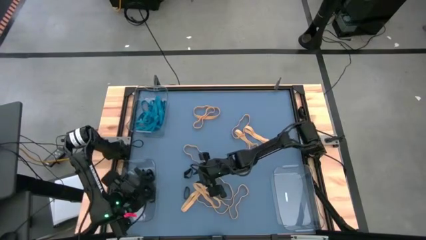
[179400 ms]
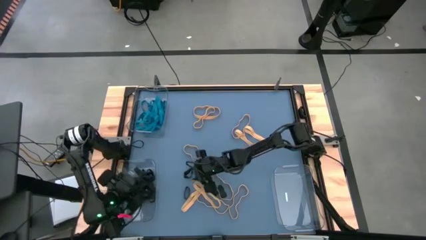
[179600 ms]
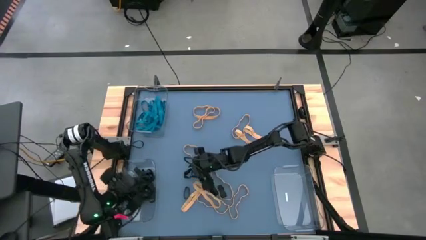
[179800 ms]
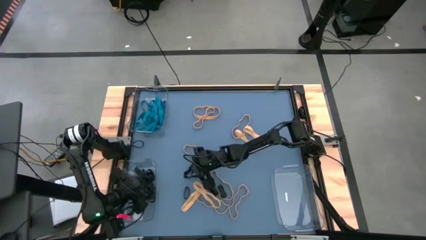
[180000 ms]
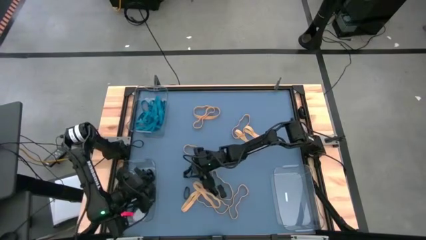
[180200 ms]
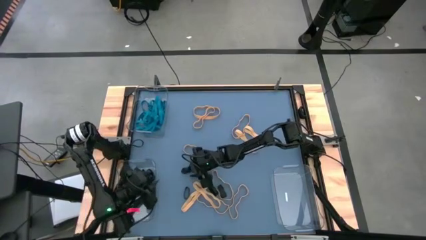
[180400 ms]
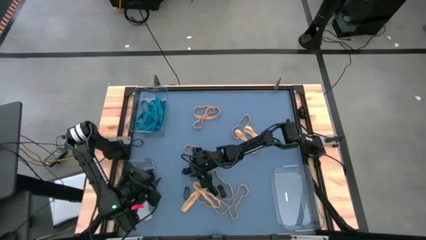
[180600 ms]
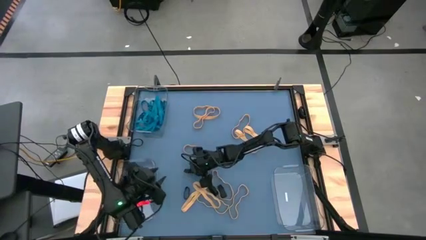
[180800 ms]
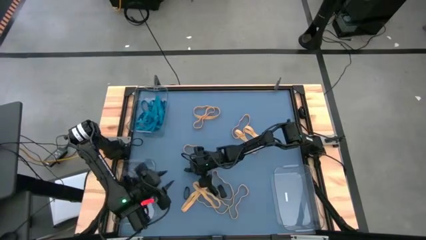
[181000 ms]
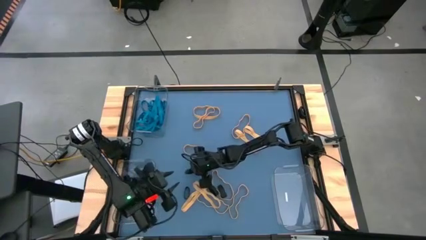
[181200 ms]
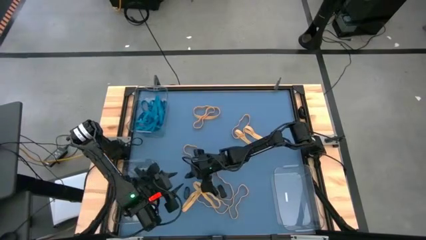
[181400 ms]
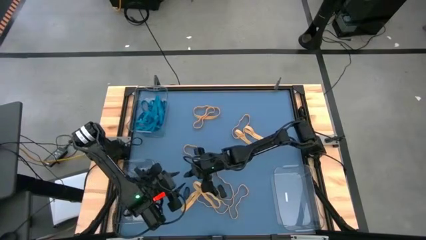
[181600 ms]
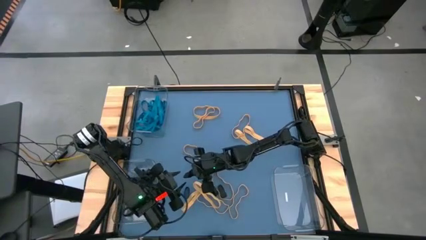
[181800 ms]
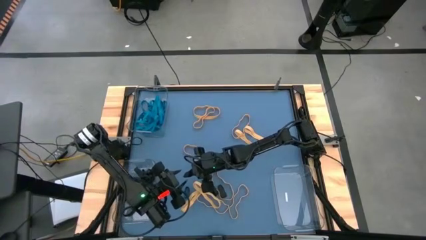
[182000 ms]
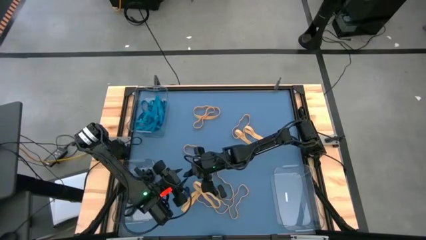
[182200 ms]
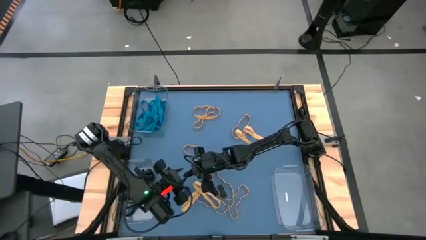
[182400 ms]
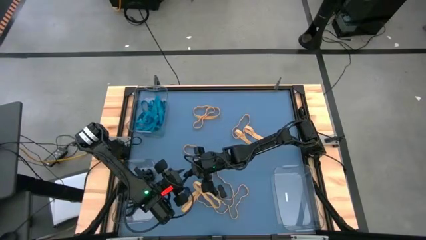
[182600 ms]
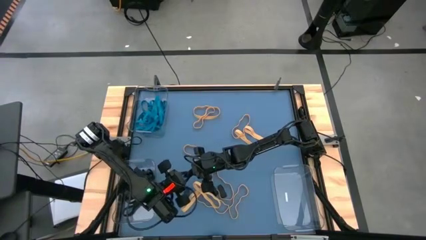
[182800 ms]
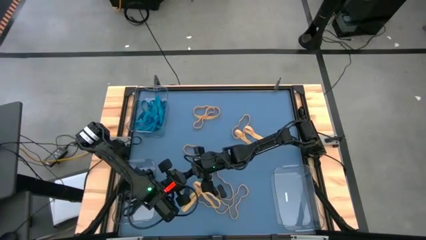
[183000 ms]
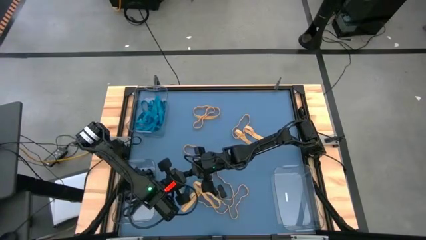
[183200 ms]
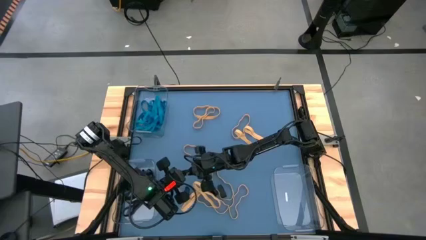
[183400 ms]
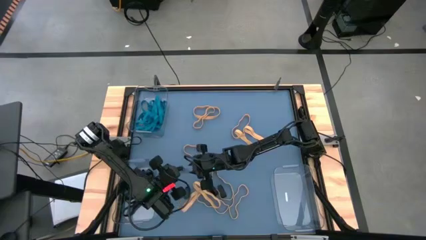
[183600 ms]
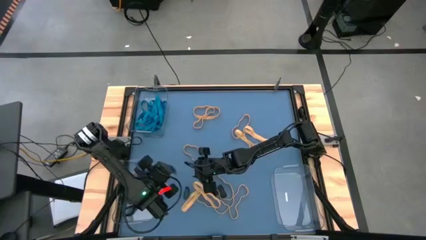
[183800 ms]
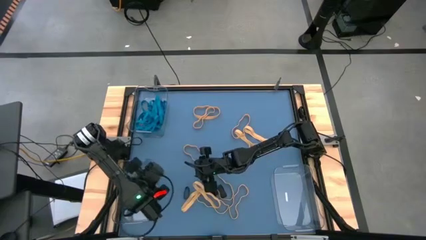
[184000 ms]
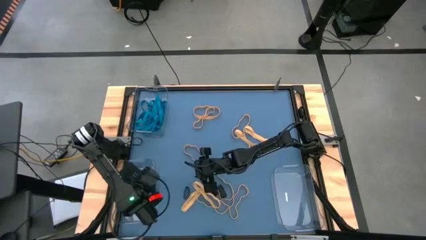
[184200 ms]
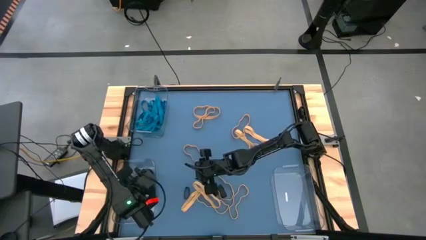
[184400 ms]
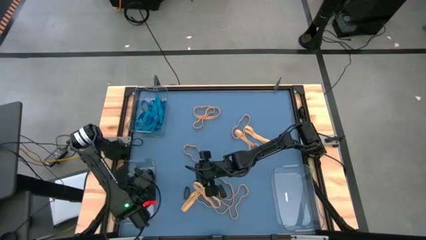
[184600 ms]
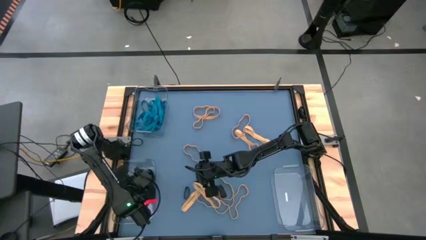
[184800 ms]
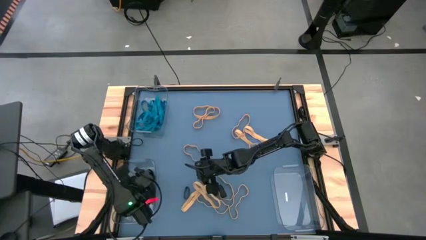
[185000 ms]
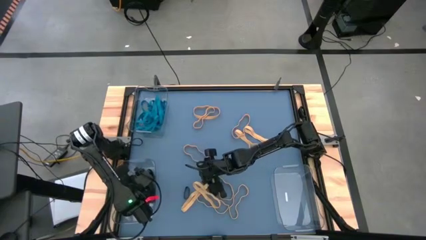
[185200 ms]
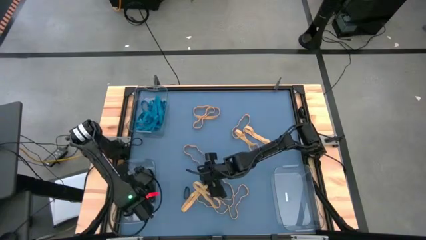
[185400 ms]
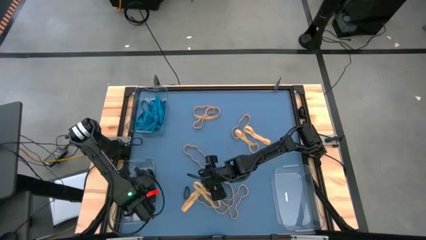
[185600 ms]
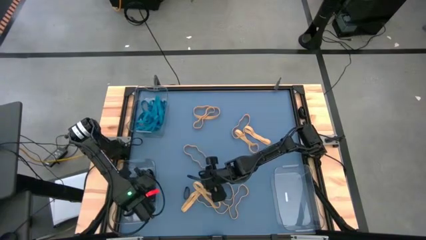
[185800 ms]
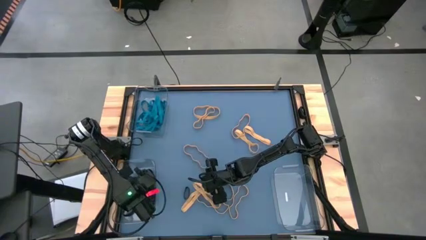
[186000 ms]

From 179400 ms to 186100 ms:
Task: Sort rubber bands into baskets
Put the black rubber band into the bottom left transparent bin

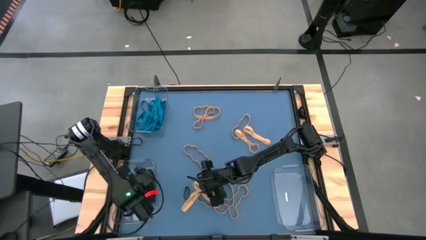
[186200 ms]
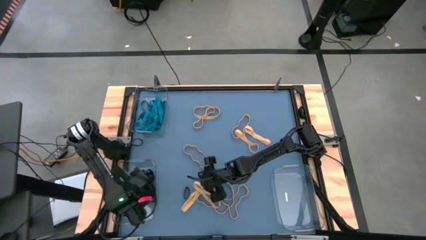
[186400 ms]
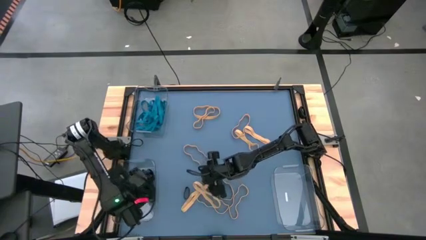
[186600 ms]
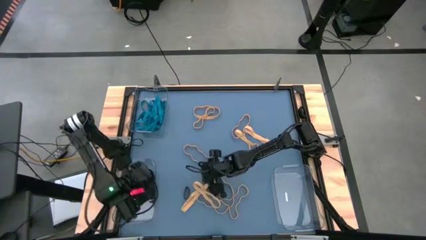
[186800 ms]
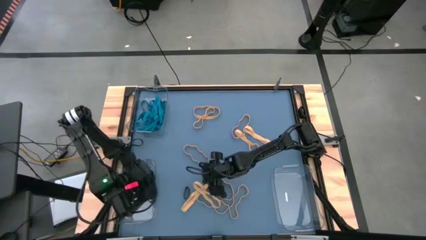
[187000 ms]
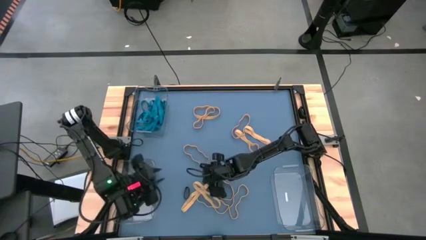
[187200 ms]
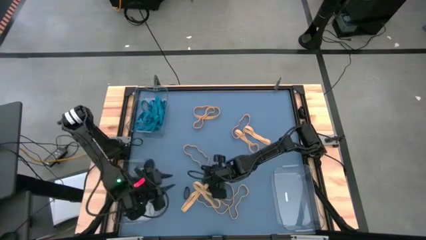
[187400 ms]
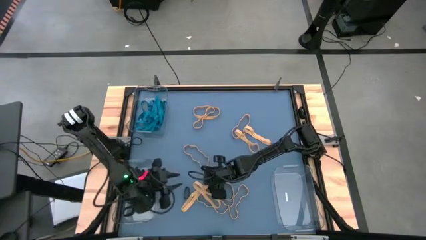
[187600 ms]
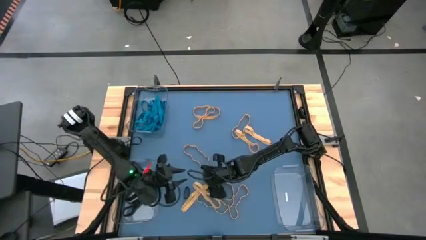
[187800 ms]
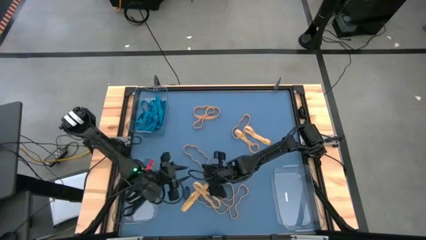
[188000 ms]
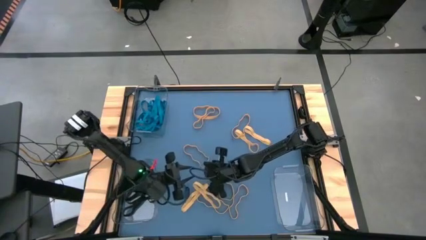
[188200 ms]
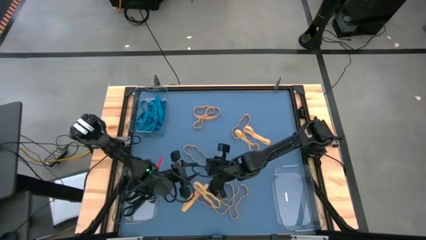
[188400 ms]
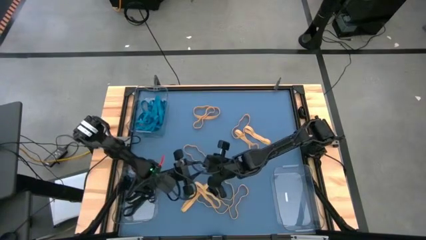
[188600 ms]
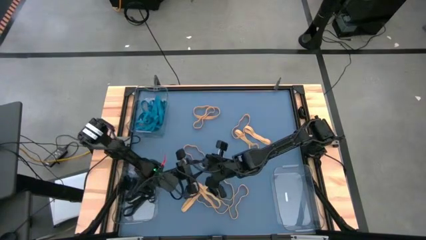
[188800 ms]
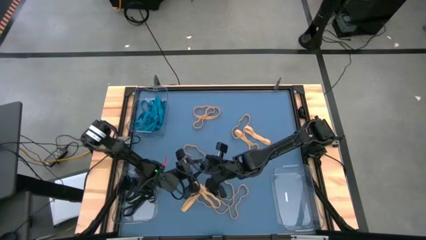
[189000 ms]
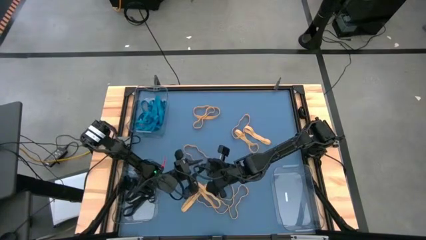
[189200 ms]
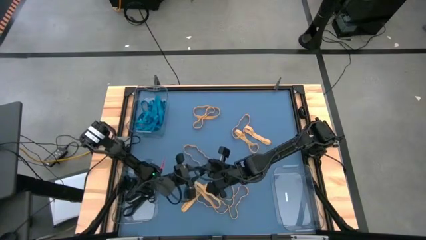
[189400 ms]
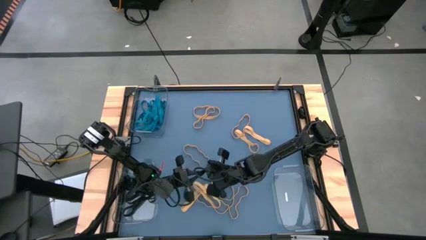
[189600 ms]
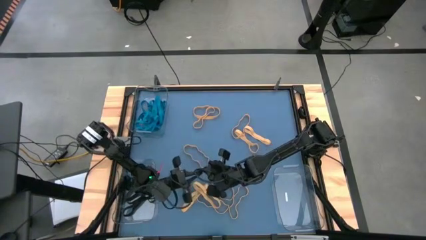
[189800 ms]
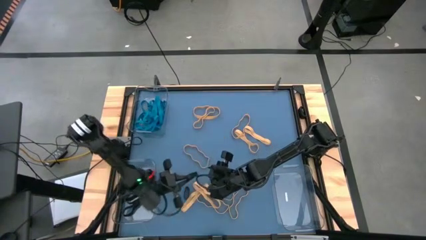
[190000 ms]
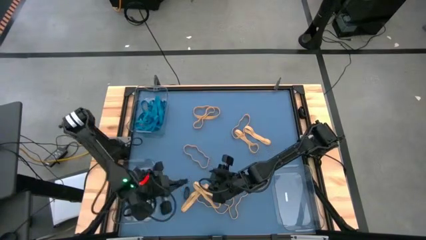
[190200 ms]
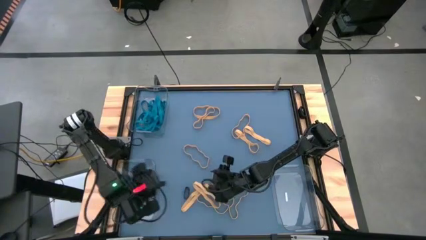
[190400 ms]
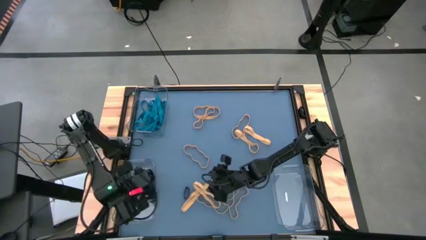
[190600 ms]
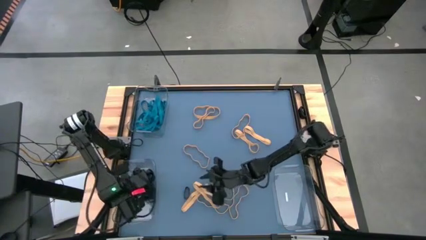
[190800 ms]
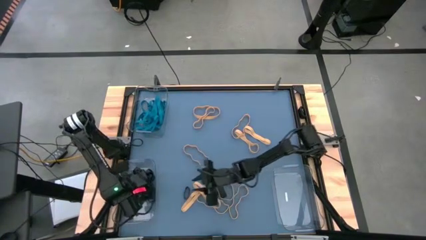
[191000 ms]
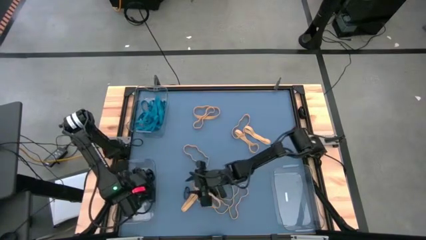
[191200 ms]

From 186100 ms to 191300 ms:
Put the black rubber band into the bottom left transparent bin

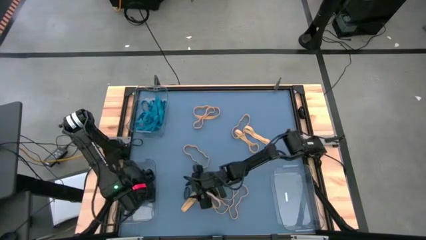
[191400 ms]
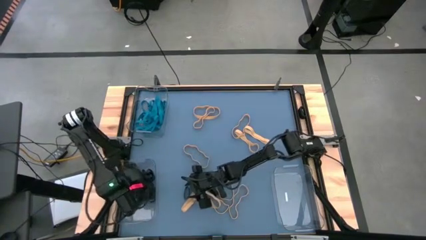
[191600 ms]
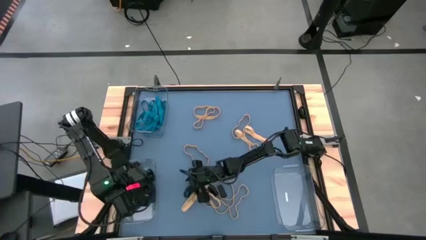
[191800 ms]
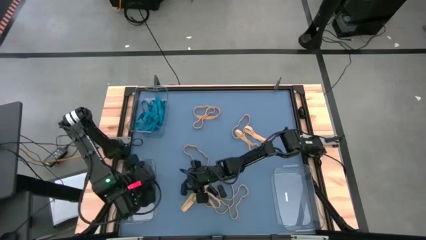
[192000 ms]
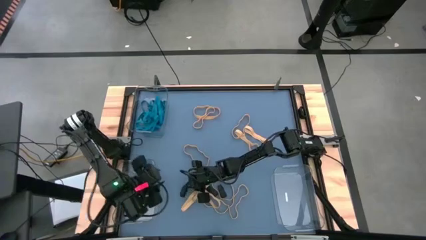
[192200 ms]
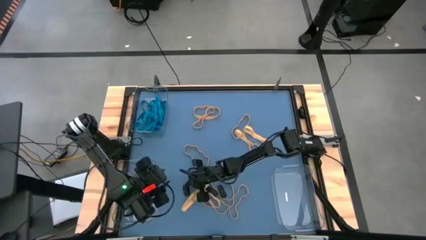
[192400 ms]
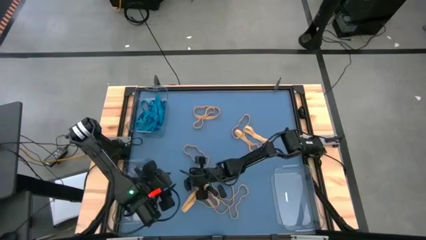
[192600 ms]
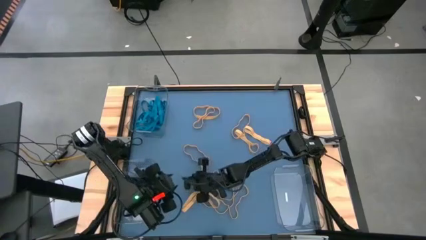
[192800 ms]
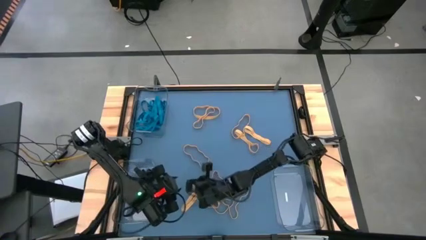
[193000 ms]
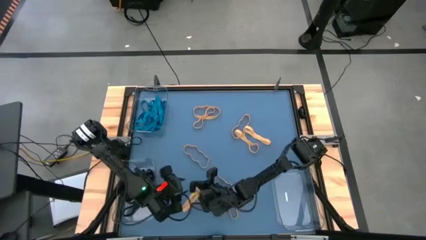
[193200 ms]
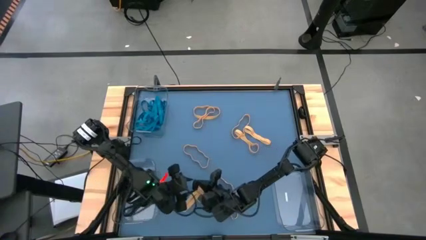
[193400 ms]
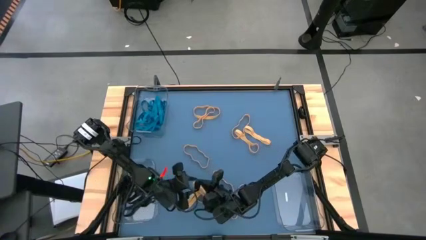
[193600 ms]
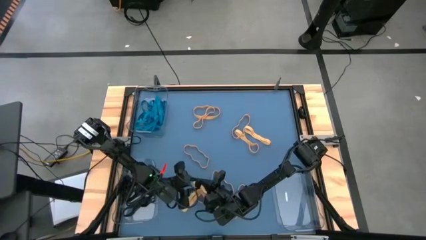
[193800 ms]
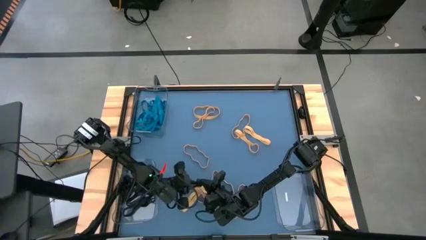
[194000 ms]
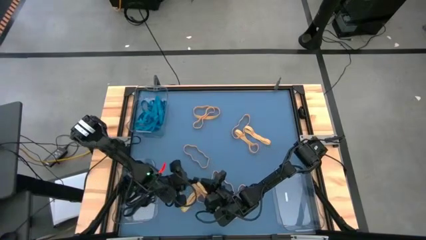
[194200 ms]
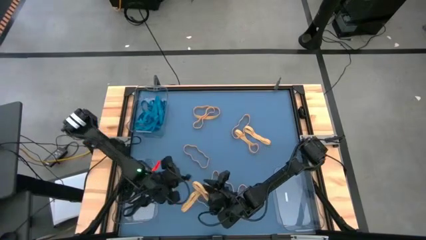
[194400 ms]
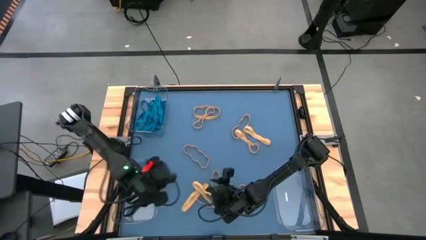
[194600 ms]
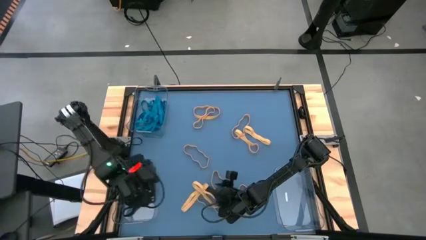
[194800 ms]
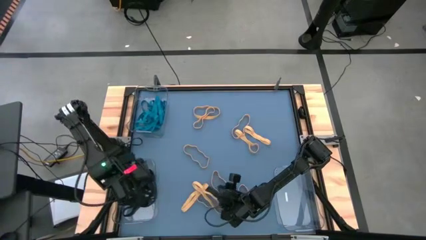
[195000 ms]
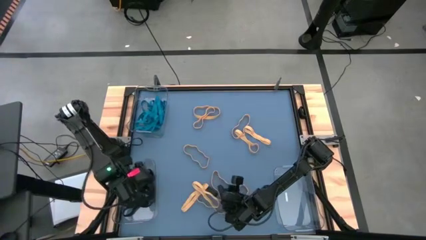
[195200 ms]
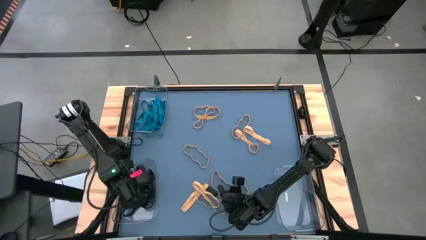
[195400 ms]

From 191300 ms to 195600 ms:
Put the black rubber band into the bottom left transparent bin

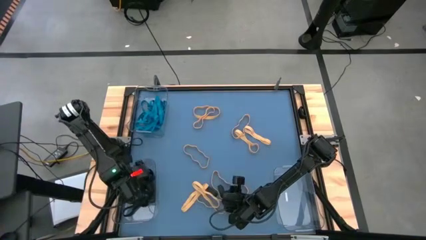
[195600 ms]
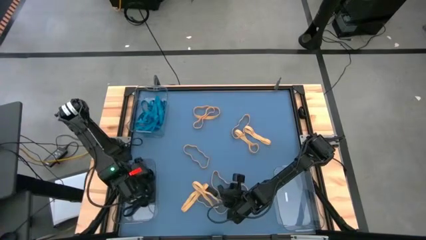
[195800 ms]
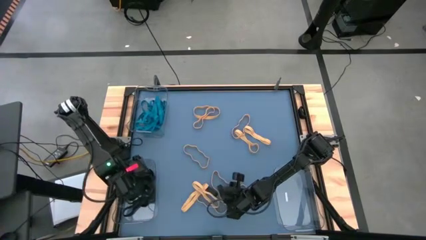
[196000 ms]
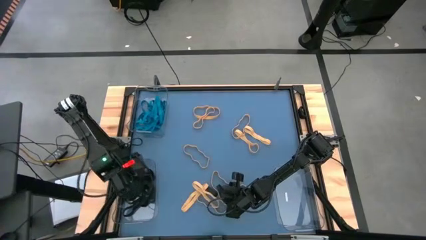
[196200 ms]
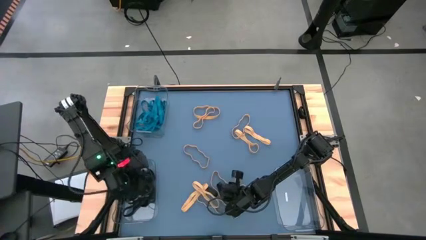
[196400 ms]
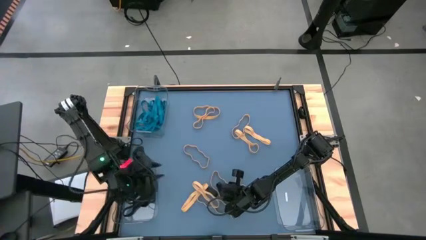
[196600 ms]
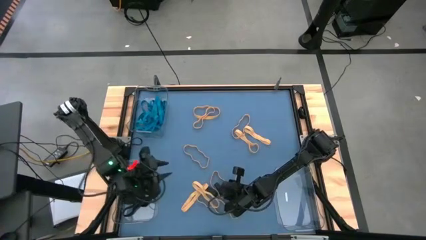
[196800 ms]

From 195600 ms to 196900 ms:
Put the black rubber band into the bottom left transparent bin
